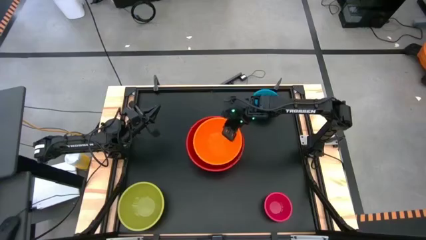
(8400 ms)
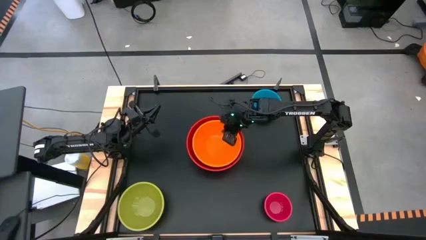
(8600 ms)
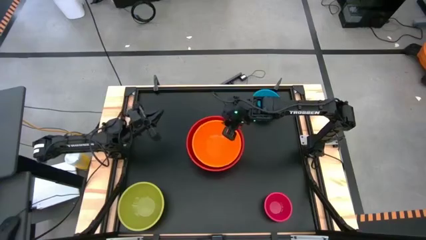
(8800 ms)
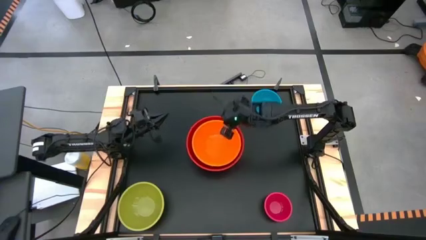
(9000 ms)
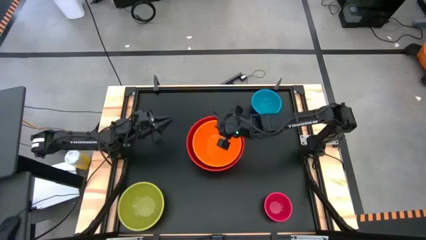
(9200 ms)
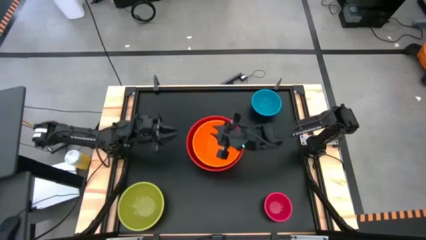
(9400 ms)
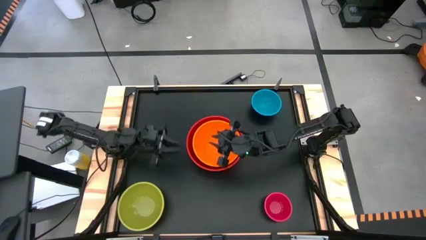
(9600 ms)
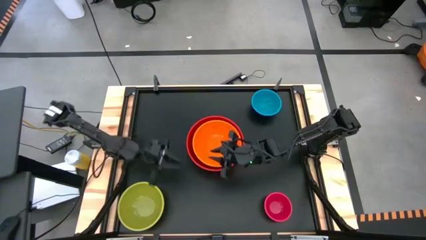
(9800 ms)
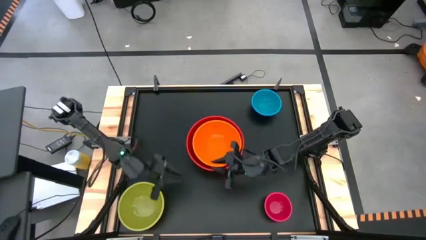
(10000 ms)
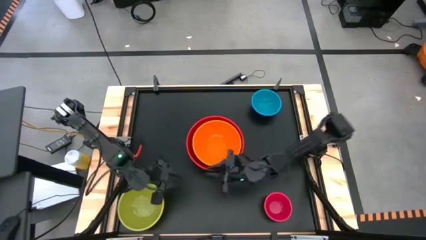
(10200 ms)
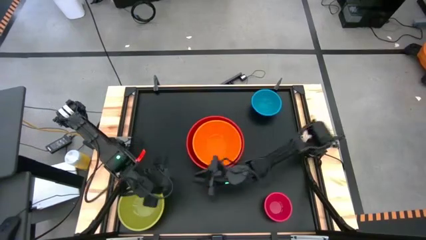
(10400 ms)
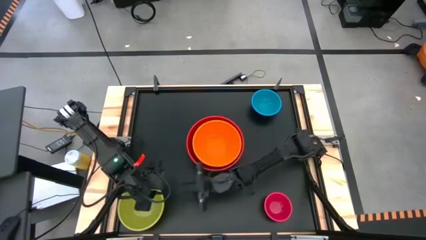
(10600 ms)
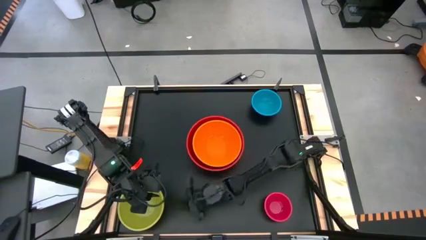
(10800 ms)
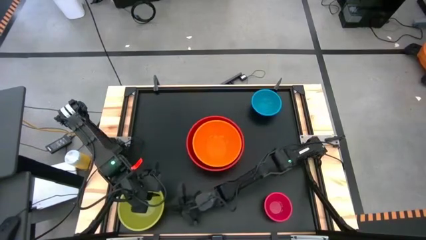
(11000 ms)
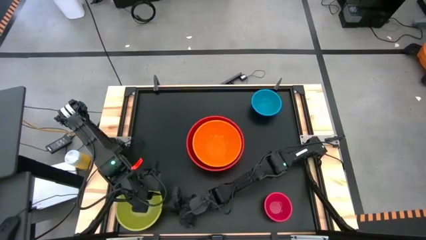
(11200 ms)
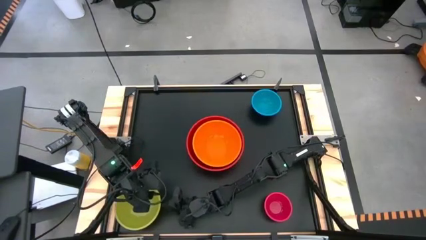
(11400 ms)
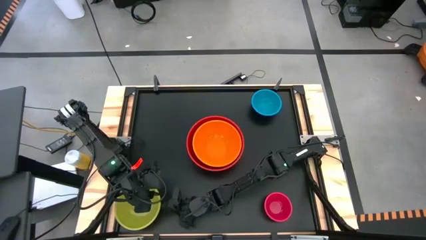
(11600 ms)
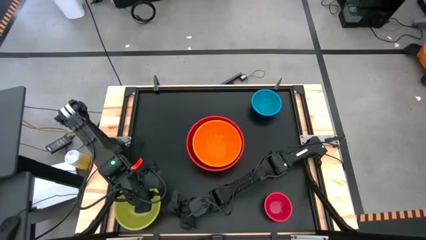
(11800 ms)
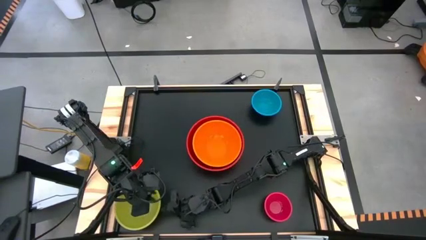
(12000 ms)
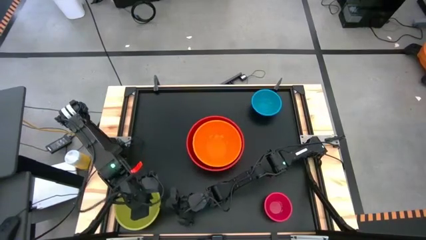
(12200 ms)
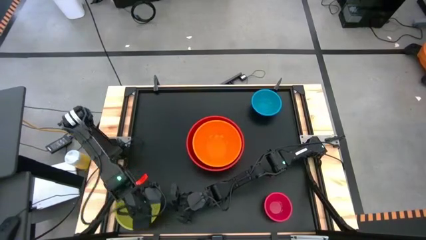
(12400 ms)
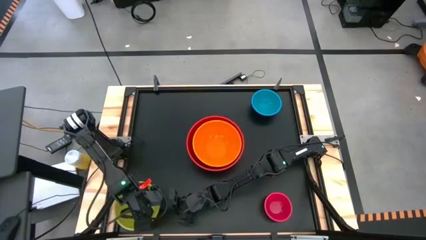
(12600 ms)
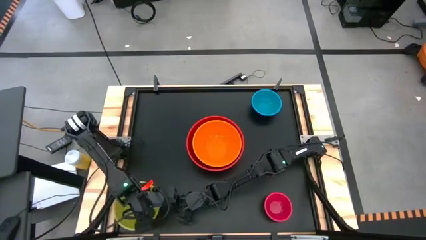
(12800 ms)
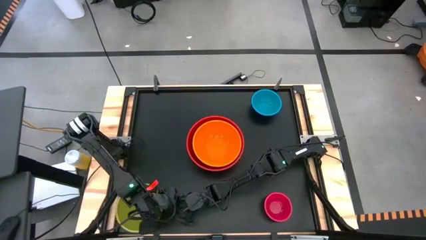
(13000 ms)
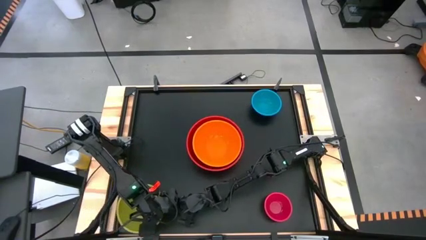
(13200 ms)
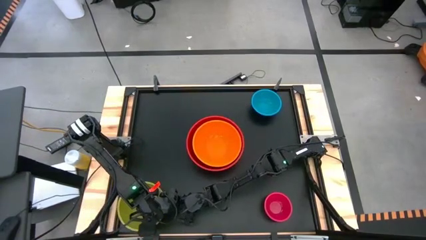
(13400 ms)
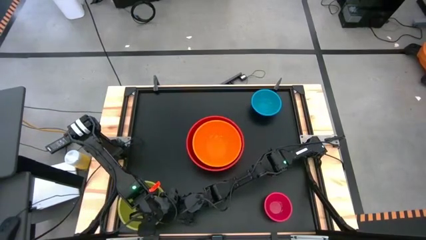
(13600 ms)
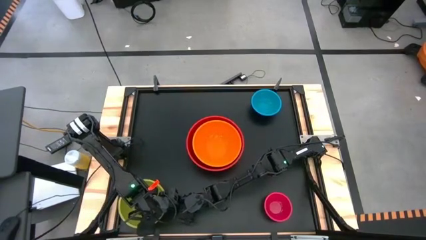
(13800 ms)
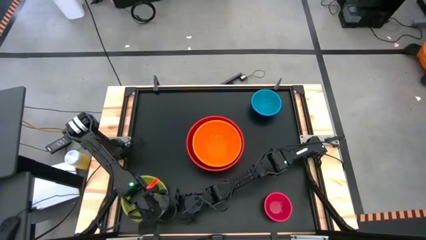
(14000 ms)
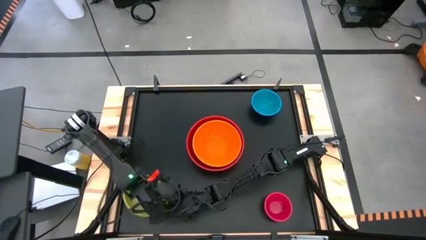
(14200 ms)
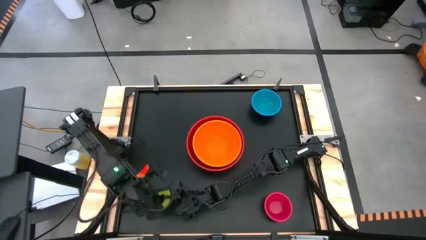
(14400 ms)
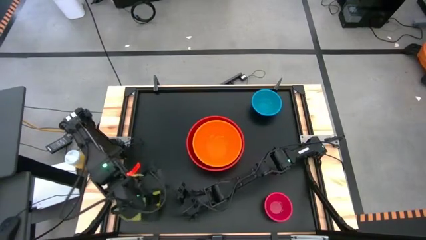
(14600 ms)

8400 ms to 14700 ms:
Stack the green bowl on top of the orange bowl

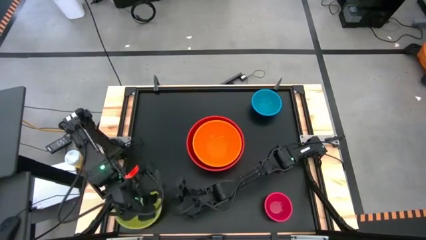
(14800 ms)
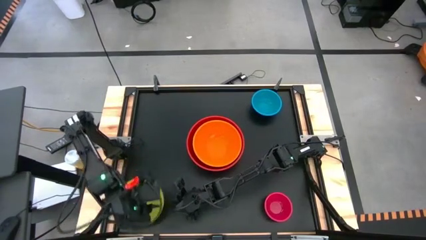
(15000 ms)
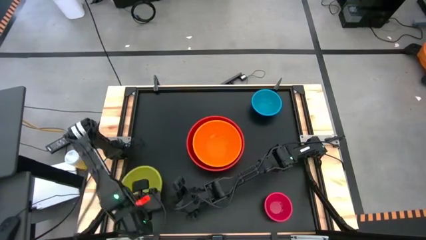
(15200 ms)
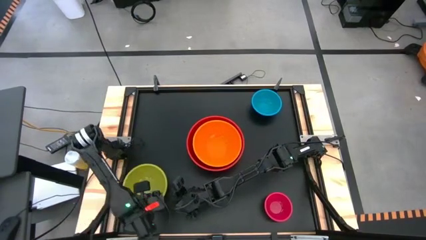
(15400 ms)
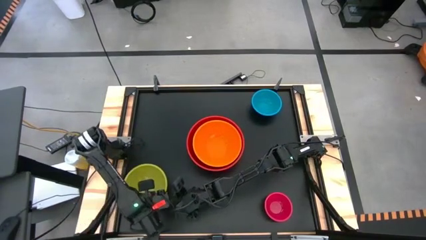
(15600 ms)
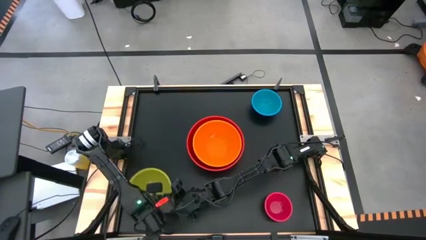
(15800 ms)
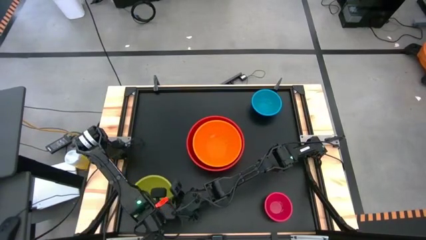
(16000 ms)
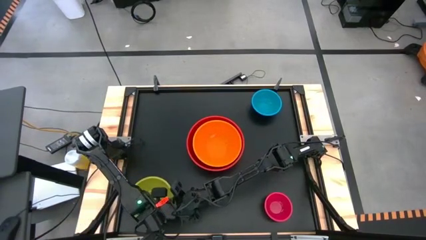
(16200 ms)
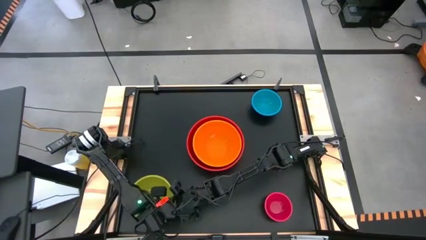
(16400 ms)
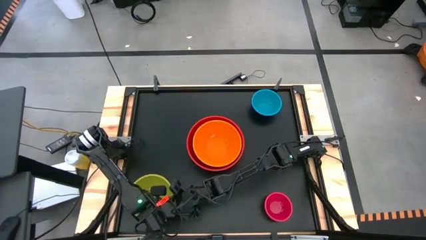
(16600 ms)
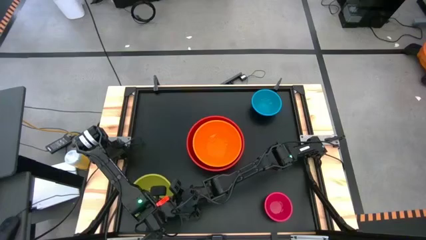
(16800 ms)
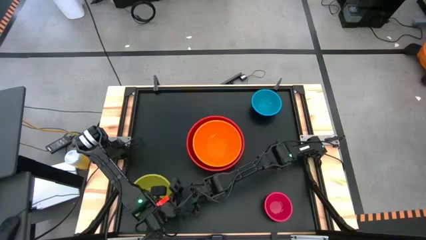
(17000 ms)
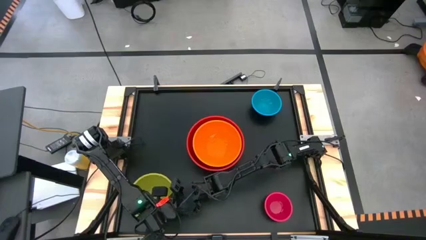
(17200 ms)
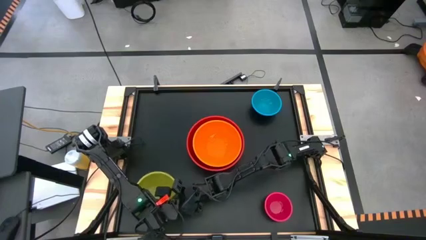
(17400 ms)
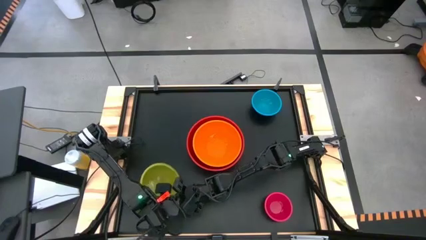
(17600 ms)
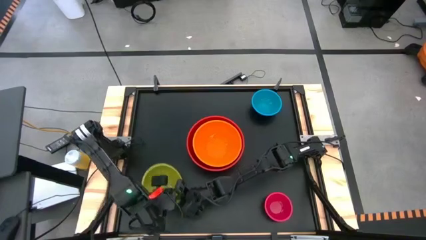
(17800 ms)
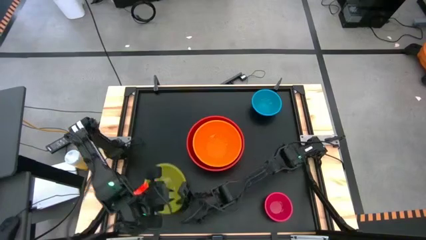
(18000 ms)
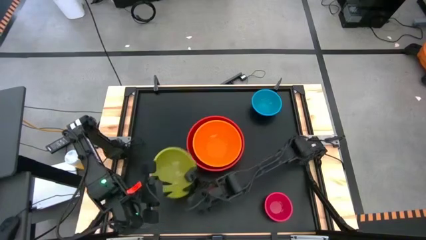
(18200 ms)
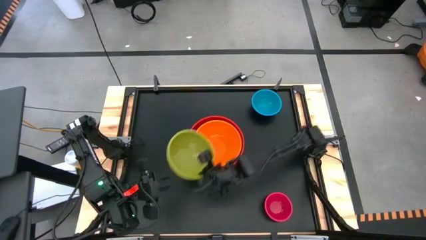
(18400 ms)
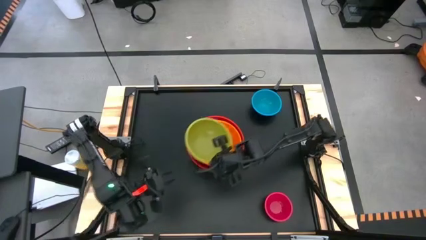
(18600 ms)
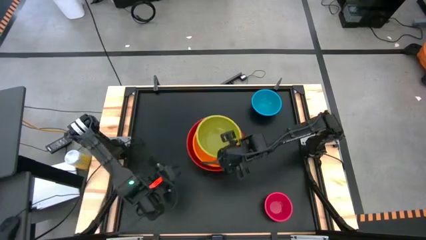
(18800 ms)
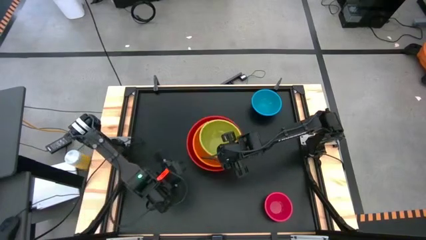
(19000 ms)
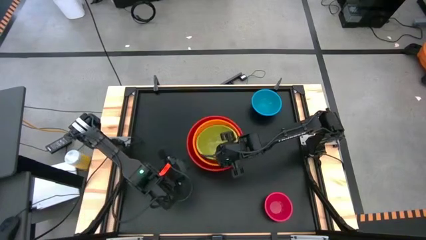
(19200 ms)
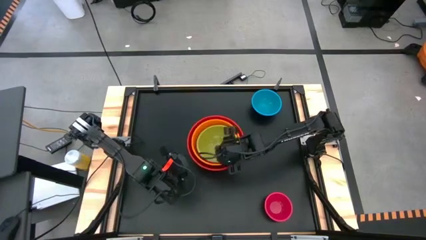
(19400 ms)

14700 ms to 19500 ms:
Stack the green bowl on top of the orange bowl

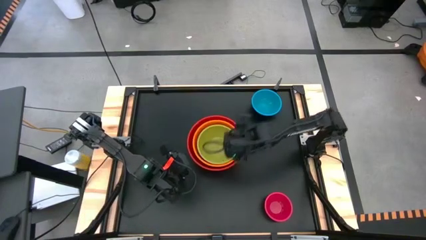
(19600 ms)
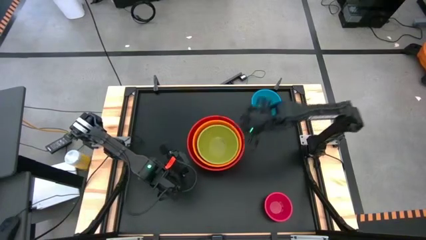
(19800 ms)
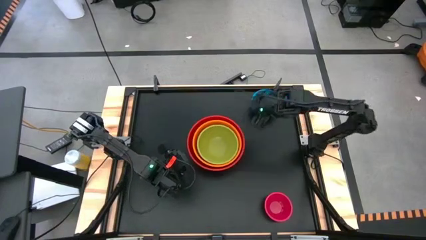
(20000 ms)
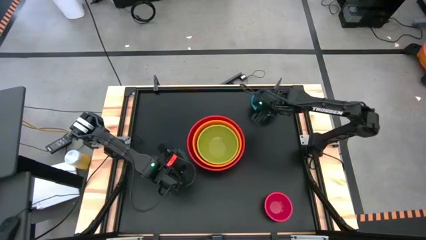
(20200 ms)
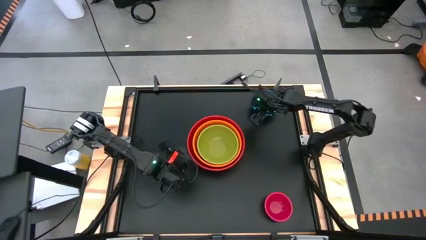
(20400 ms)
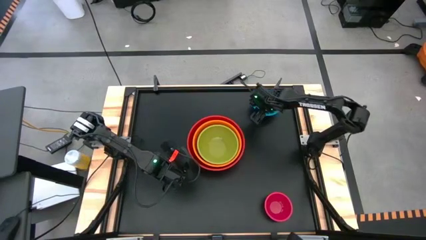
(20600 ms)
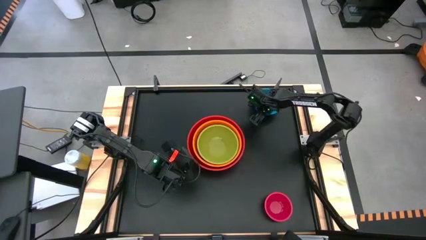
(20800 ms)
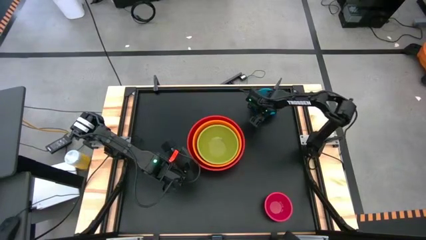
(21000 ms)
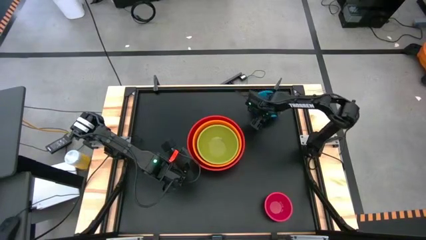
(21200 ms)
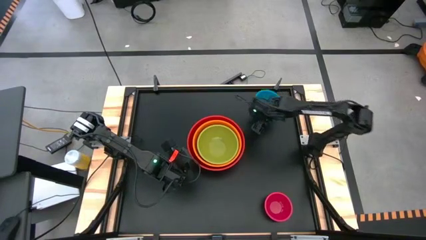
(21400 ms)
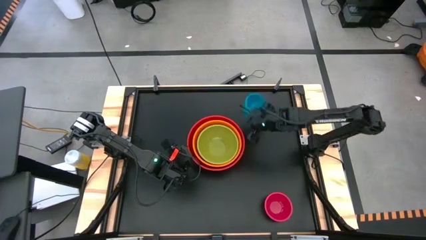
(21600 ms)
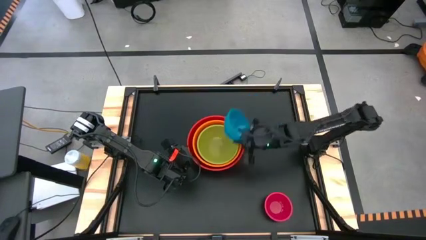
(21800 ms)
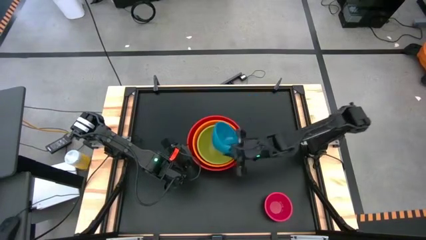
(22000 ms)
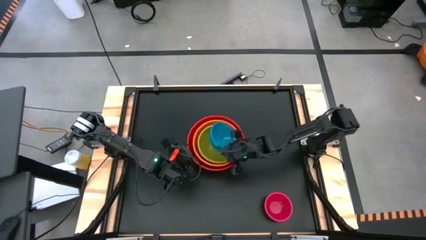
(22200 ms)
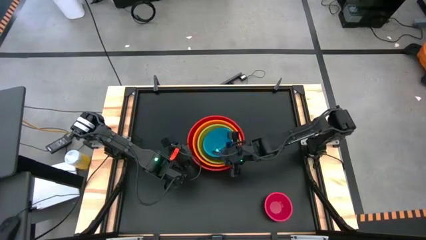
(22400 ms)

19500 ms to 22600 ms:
Stack the blue bowl on top of the green bowl

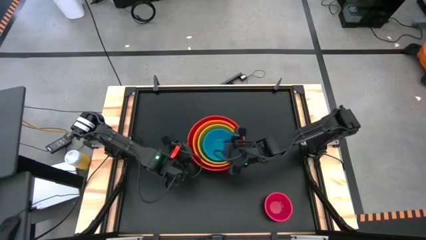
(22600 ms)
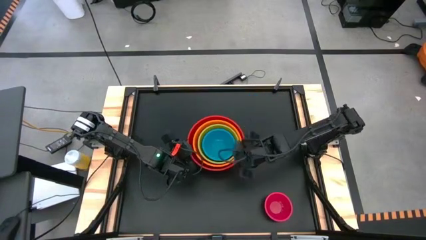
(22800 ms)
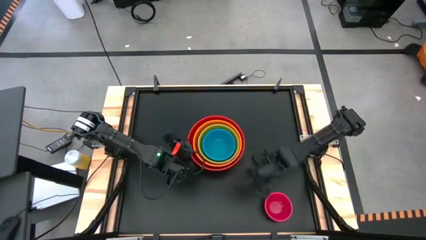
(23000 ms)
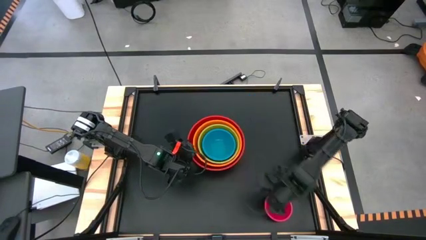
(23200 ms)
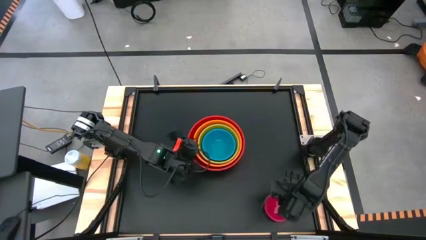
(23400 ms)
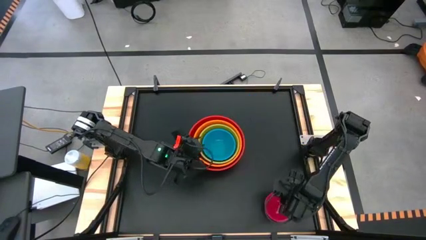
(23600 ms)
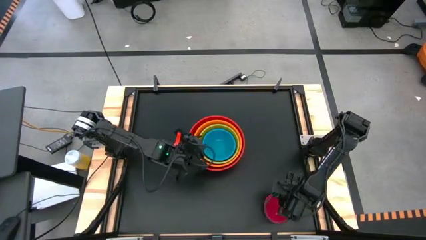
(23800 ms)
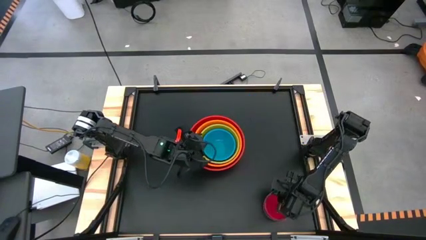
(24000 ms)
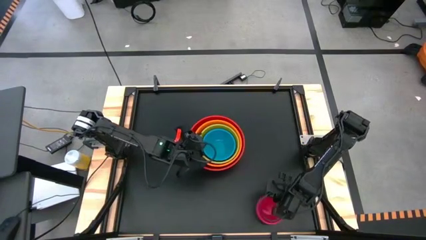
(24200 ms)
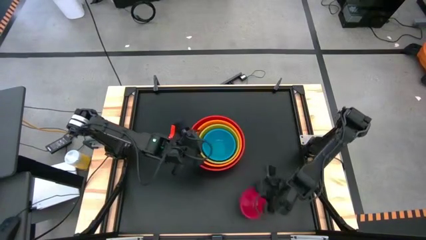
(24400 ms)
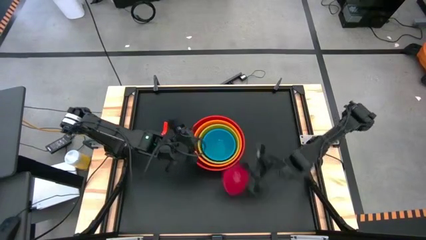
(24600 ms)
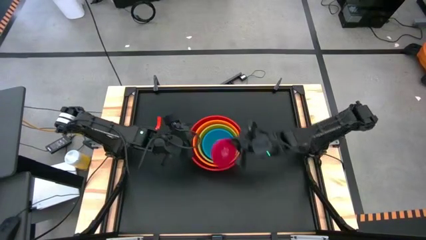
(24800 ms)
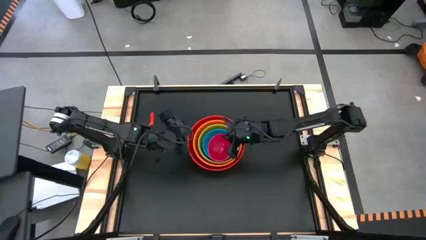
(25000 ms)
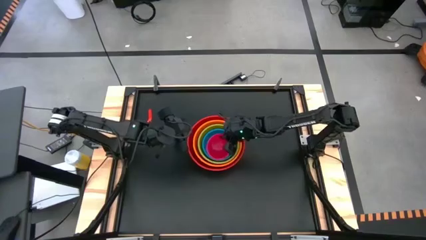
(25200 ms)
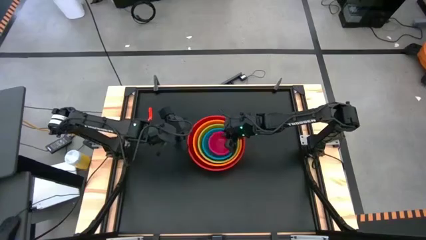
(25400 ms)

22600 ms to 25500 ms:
Stack the pink bowl on top of the the blue bowl
